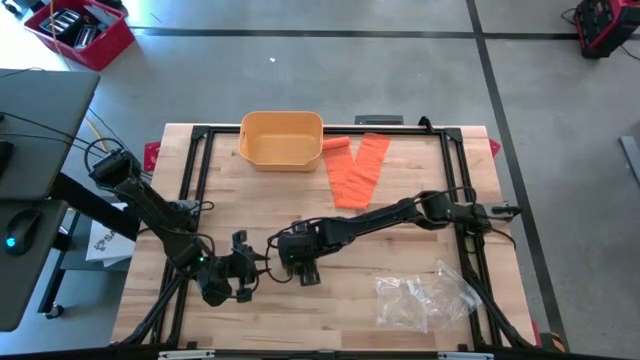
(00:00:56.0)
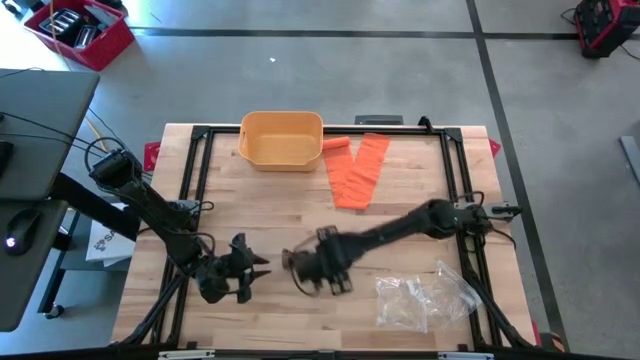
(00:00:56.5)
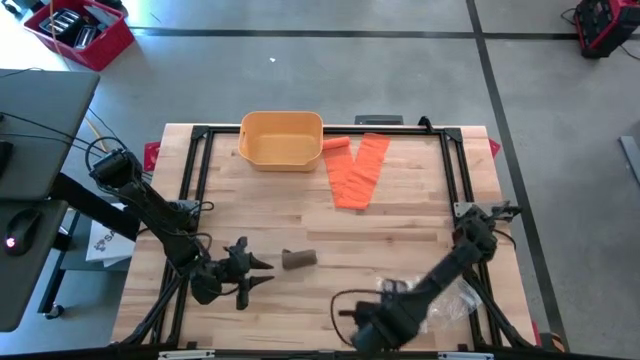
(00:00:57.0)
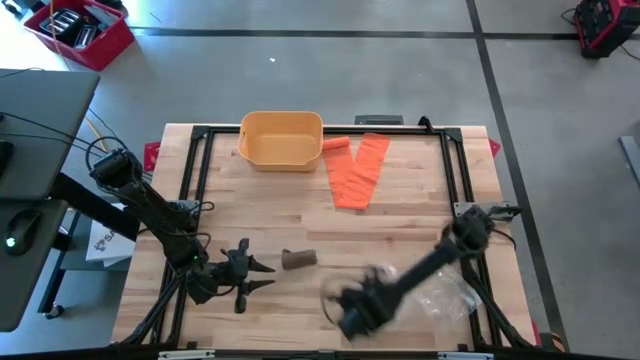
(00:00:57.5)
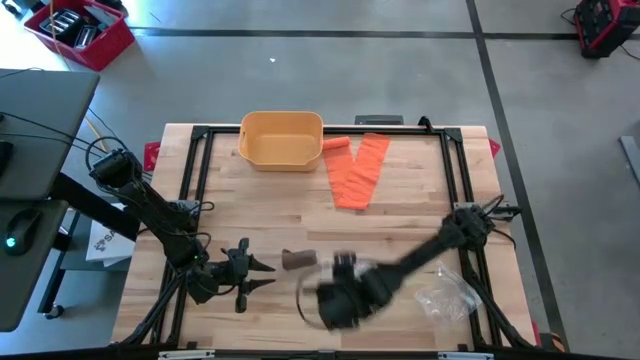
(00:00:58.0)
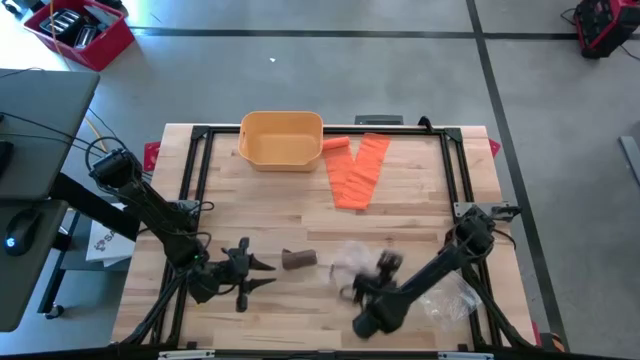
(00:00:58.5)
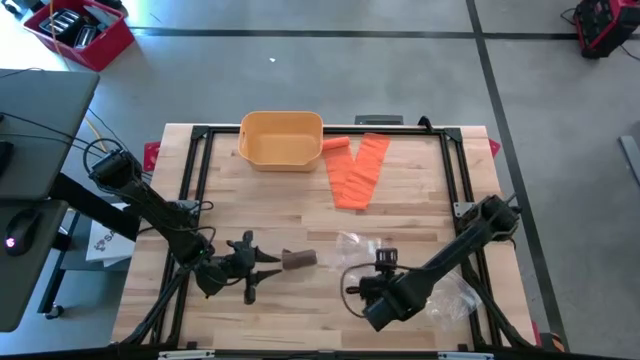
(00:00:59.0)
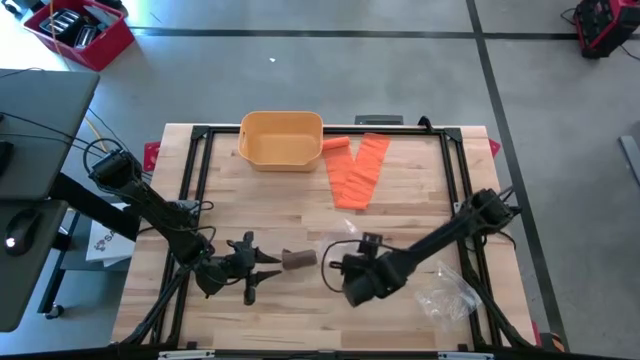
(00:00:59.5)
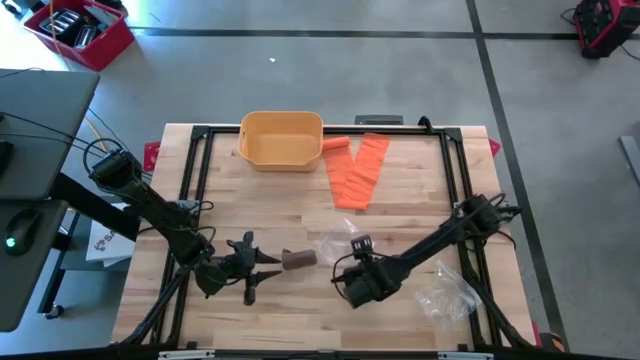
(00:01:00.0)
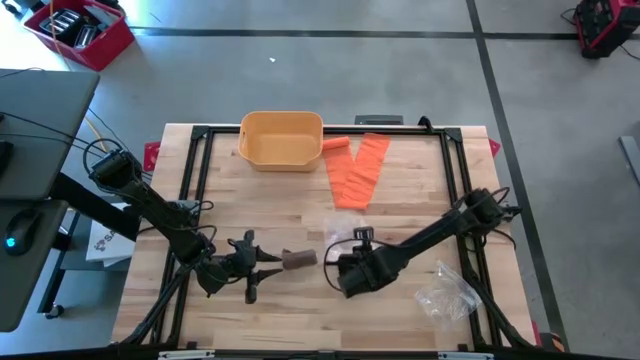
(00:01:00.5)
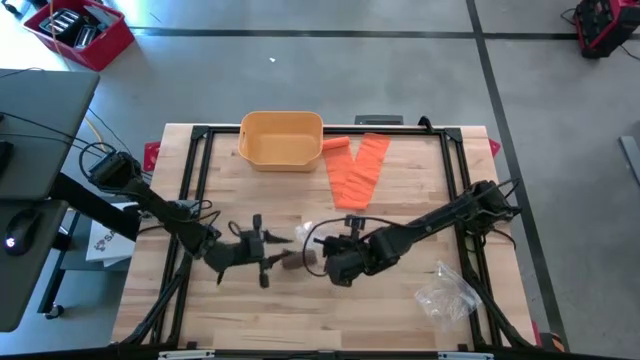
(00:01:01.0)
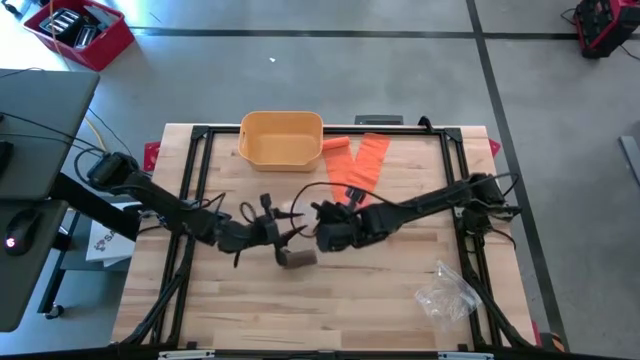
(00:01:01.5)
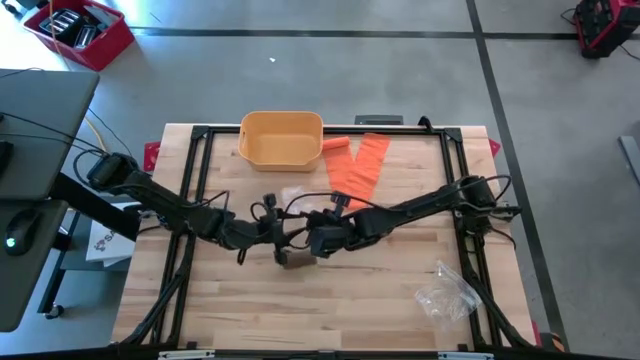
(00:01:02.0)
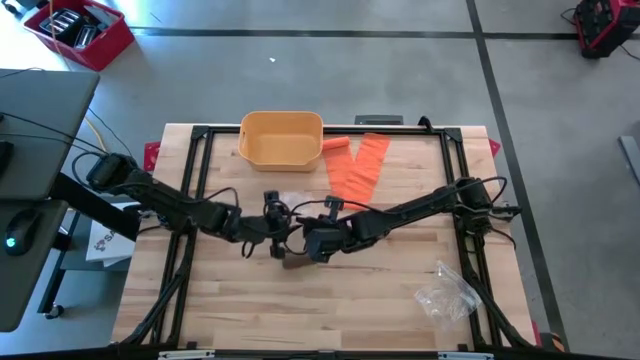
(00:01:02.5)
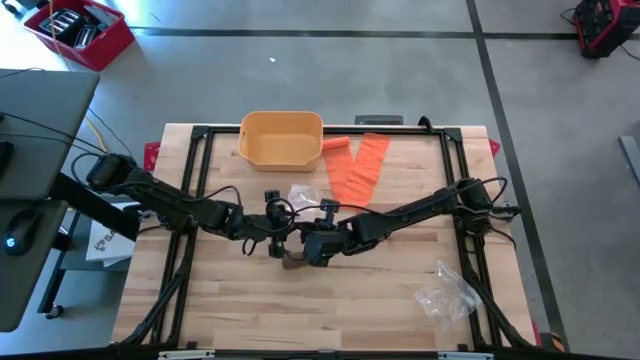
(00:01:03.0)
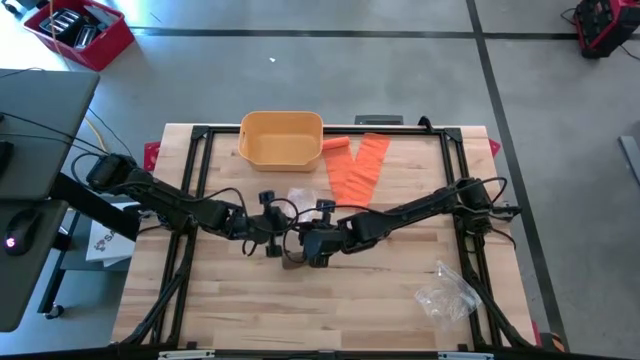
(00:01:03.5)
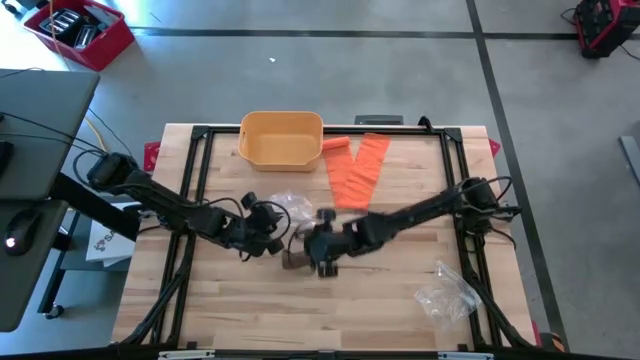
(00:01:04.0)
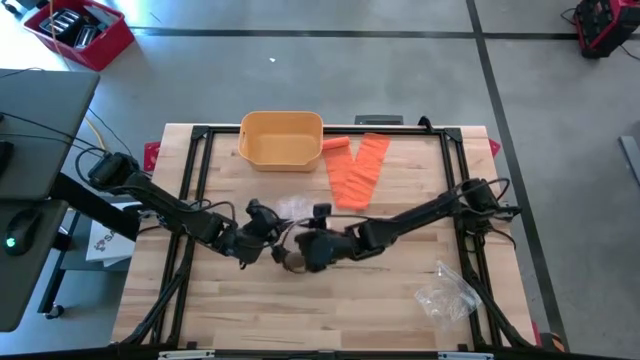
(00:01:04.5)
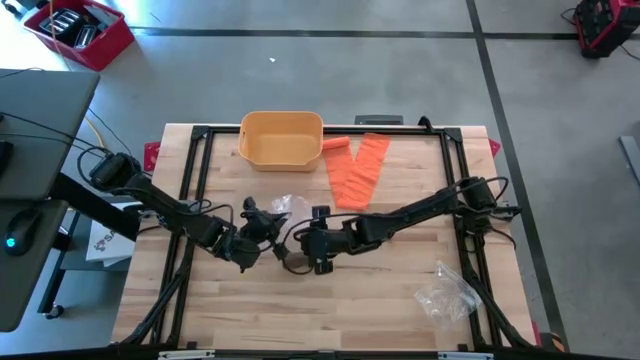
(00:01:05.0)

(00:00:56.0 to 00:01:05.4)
Task: Roll bandage
Open the left transparent zip bag

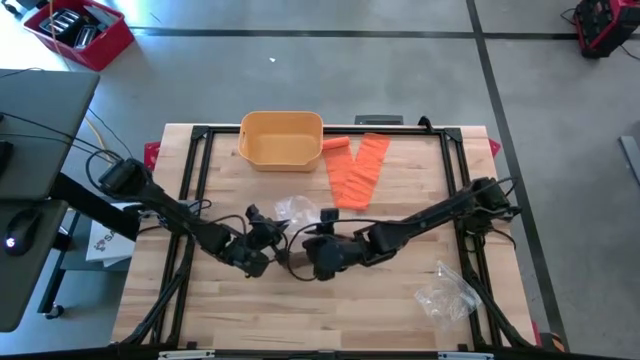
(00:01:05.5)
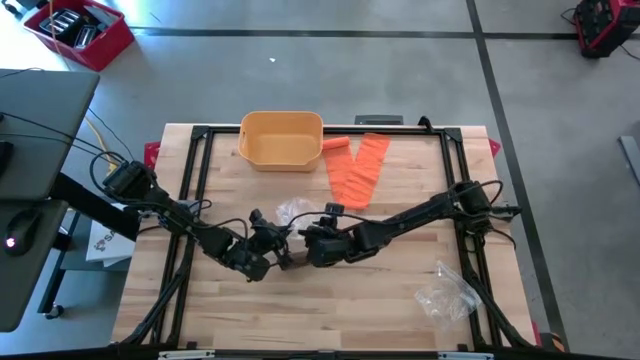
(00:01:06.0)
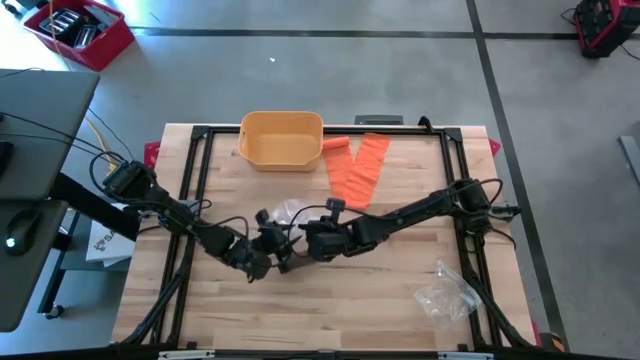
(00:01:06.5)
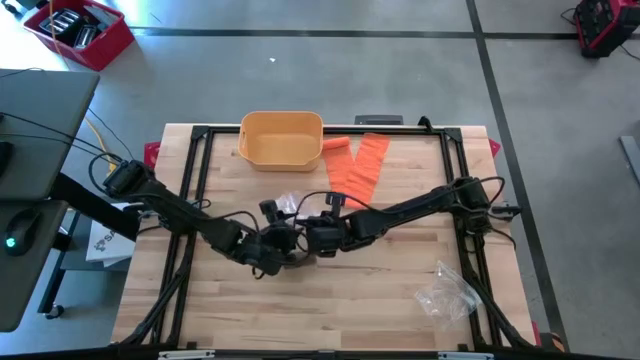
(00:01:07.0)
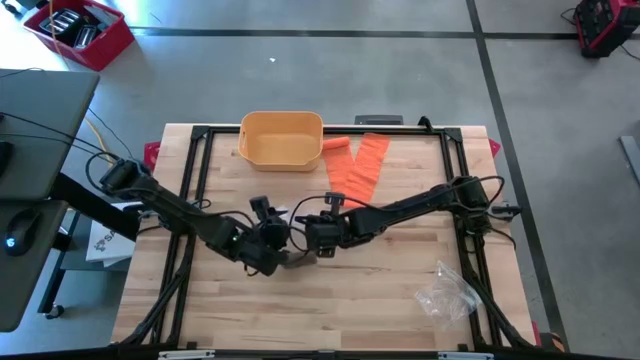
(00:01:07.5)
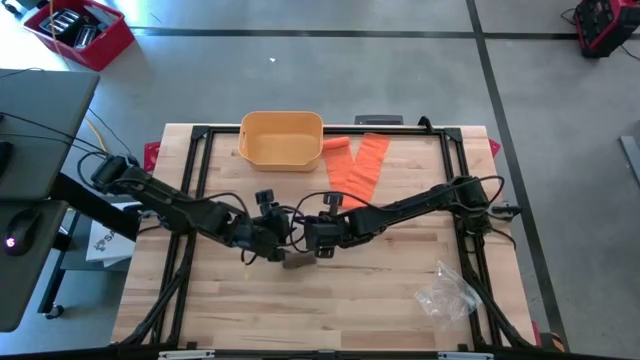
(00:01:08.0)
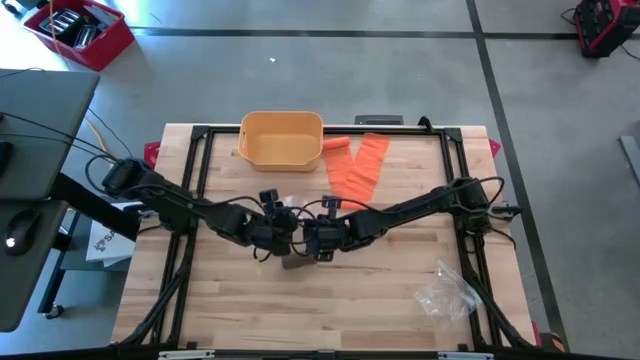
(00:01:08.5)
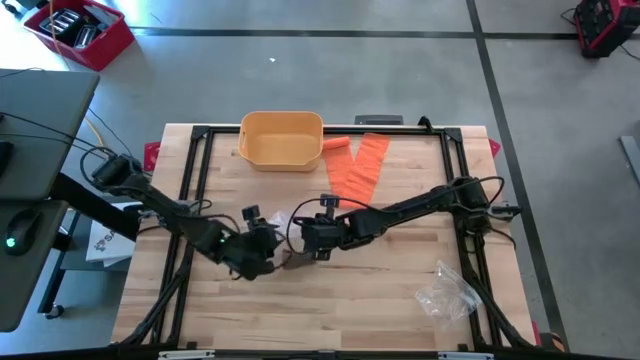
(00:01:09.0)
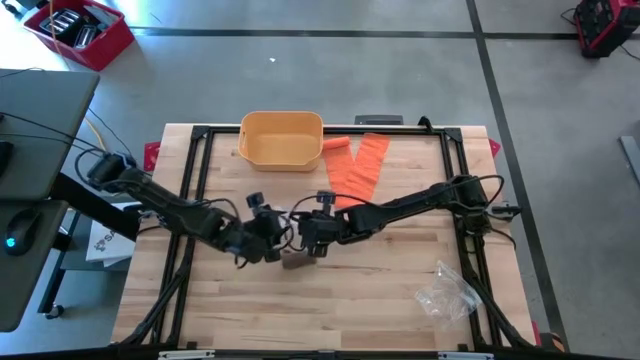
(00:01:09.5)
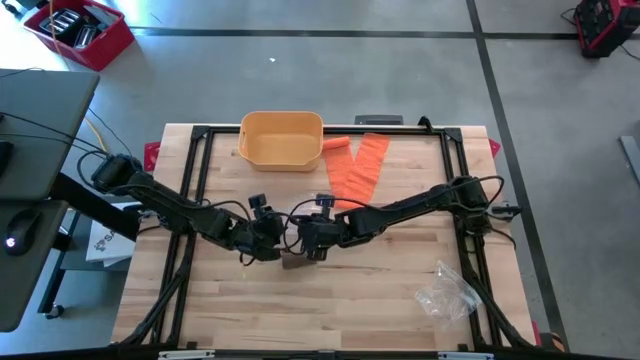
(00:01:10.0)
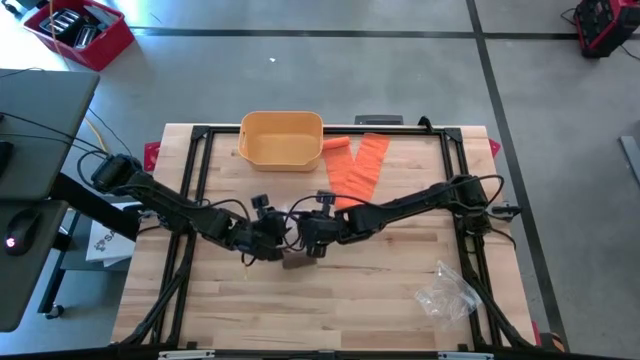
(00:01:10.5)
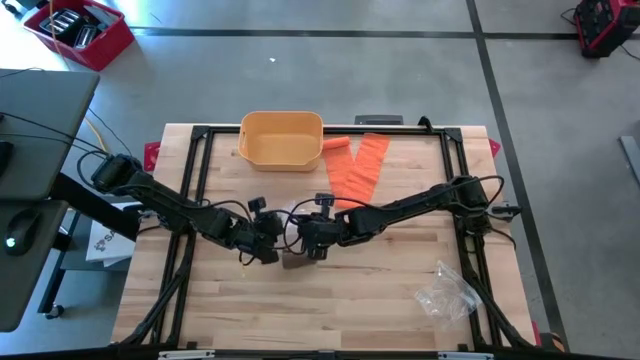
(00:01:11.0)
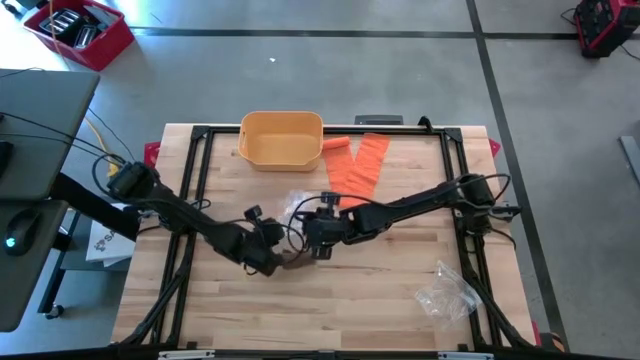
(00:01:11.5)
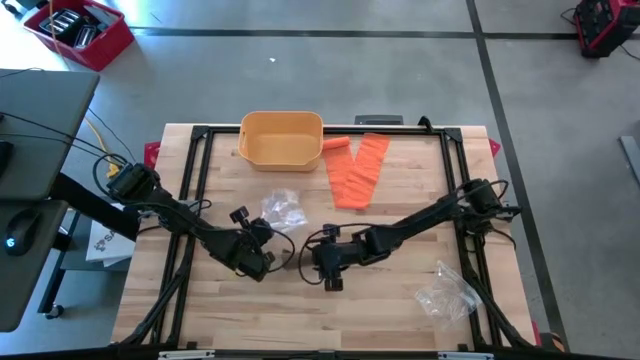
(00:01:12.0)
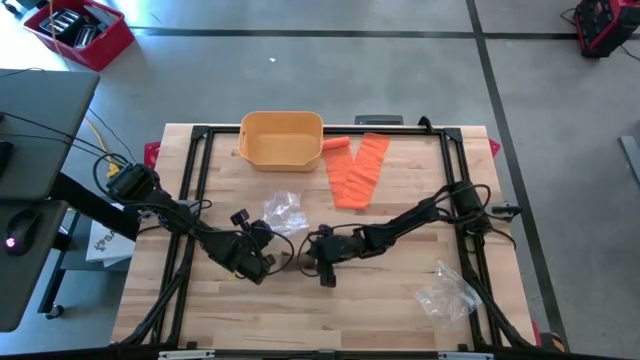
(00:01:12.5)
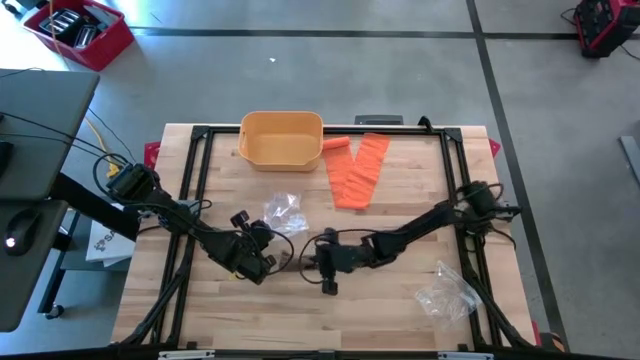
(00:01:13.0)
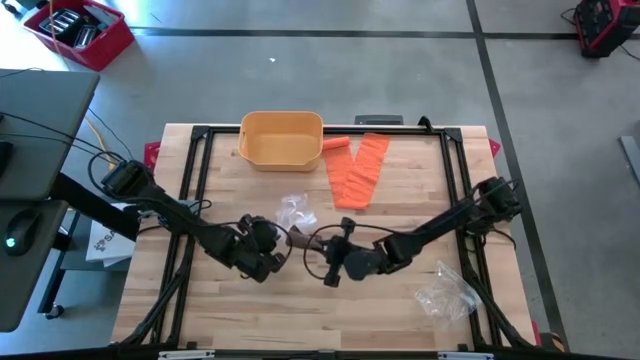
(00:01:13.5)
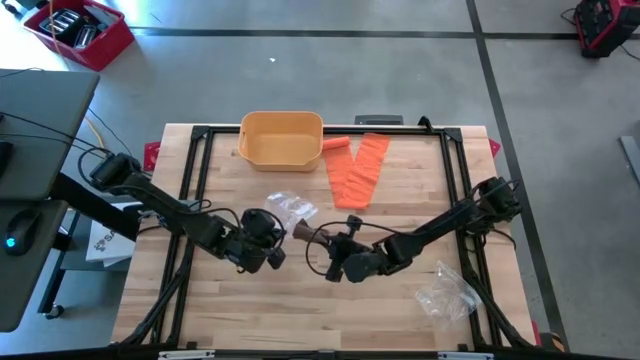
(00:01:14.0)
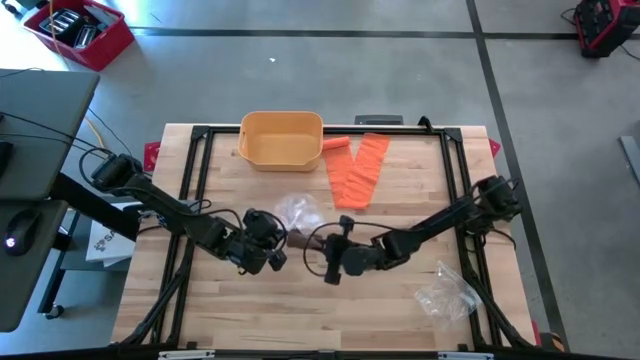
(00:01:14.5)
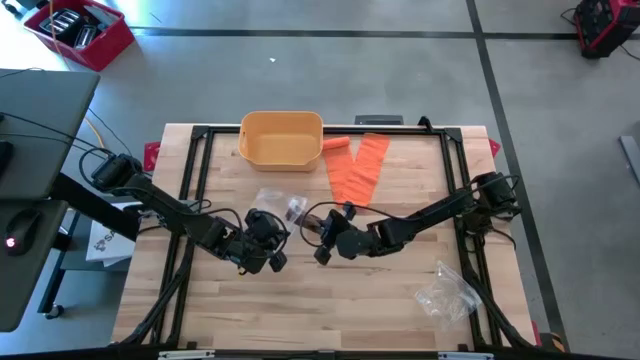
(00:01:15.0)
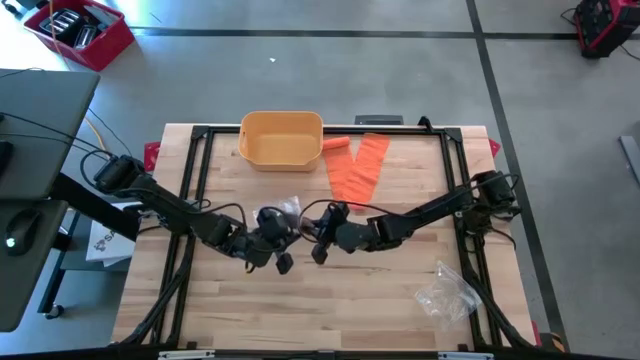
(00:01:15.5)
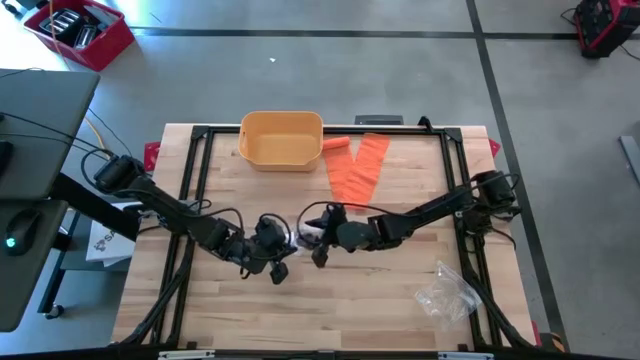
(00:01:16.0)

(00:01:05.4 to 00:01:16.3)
Put the brown bandage into the left transparent zip bag

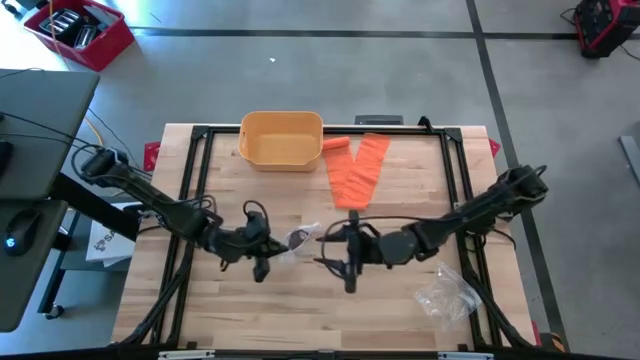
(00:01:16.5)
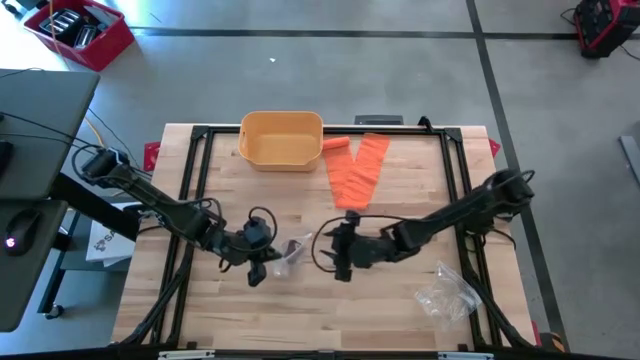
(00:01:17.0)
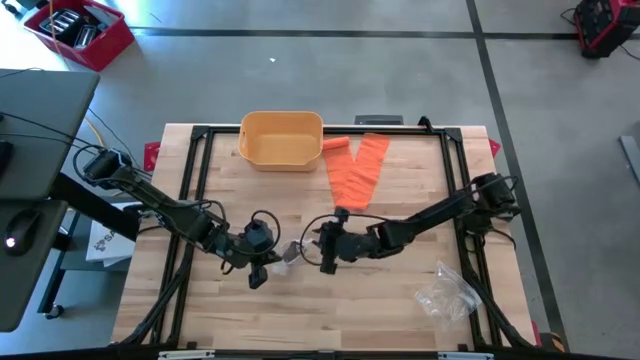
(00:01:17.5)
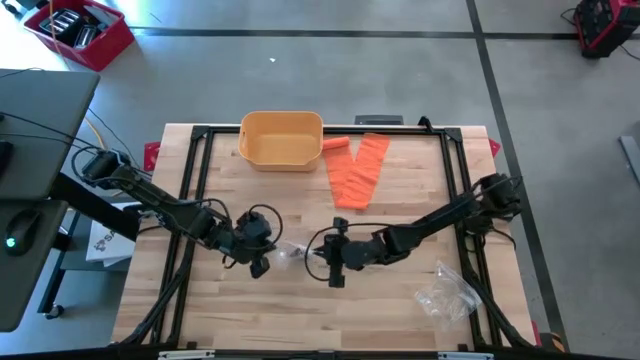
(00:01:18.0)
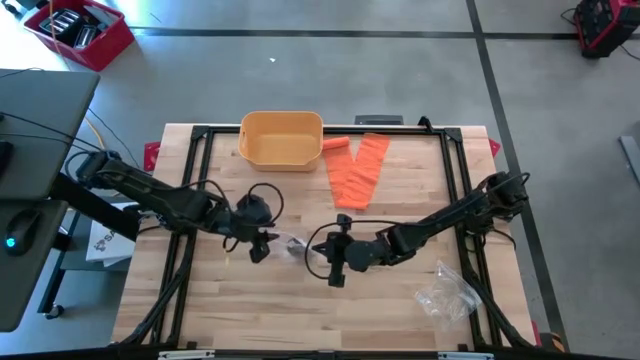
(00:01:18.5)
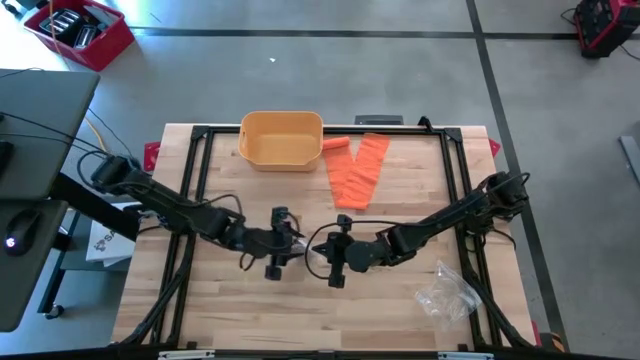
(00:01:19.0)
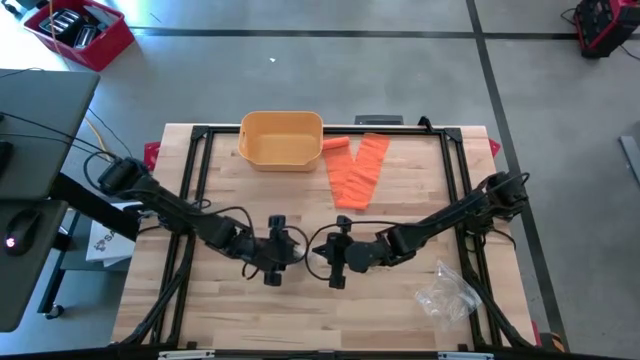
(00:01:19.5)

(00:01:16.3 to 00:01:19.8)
Close the left transparent zip bag
